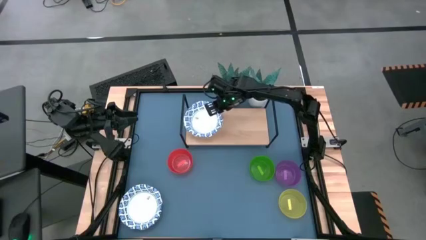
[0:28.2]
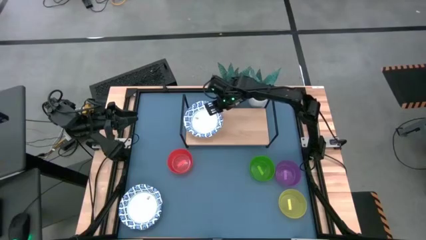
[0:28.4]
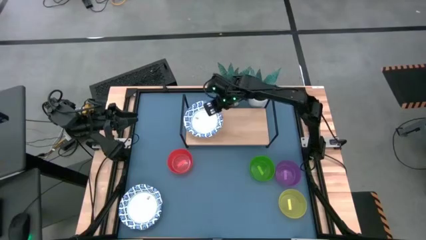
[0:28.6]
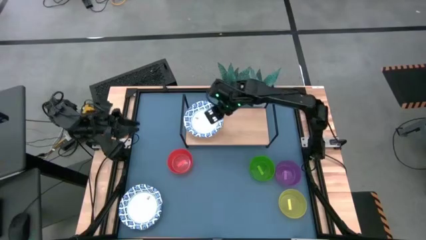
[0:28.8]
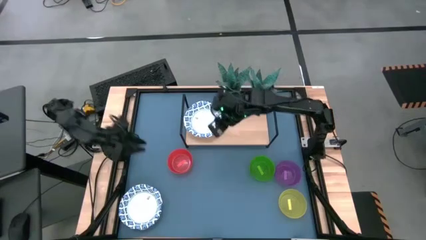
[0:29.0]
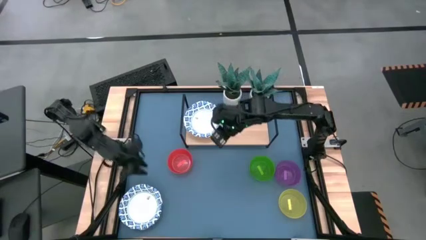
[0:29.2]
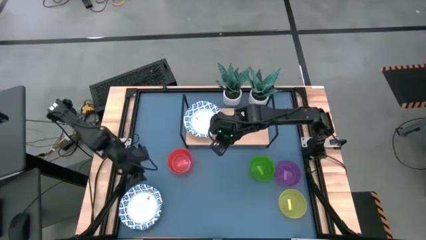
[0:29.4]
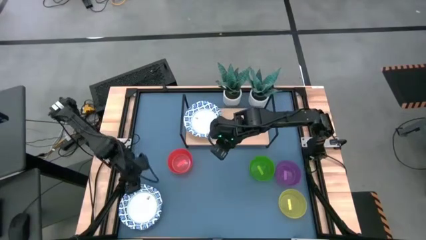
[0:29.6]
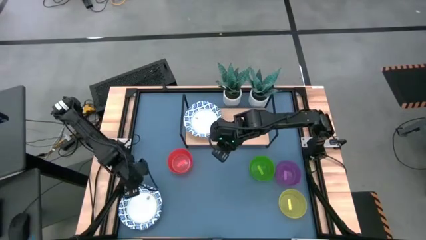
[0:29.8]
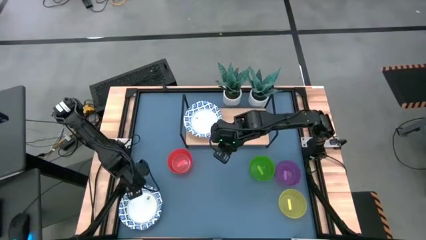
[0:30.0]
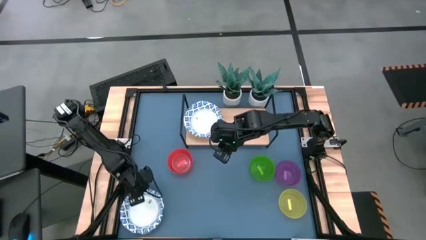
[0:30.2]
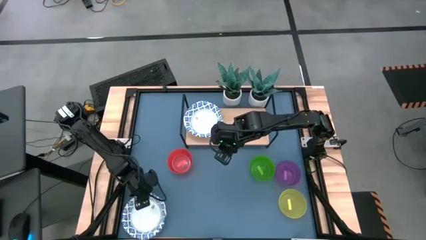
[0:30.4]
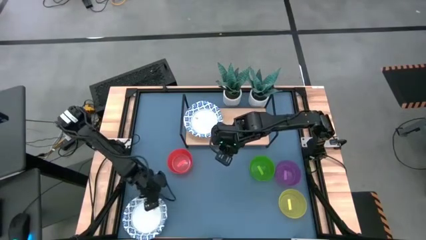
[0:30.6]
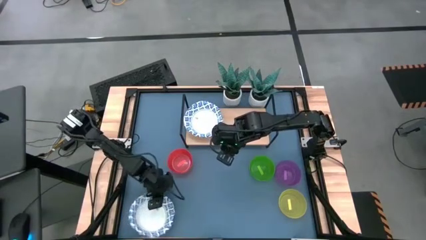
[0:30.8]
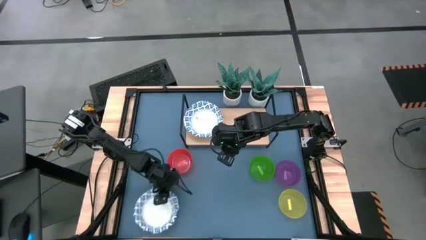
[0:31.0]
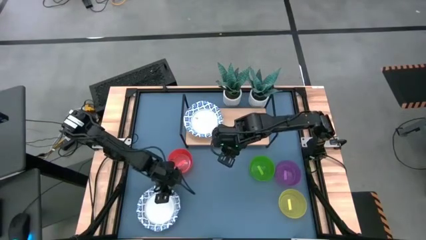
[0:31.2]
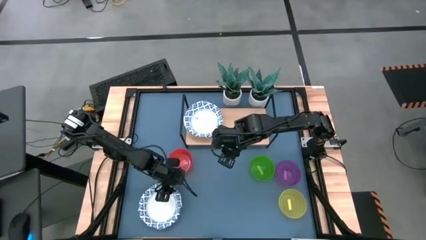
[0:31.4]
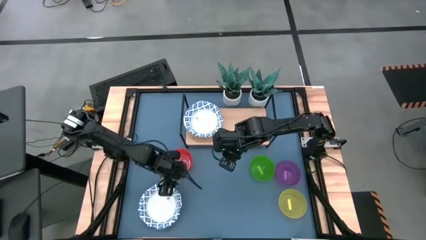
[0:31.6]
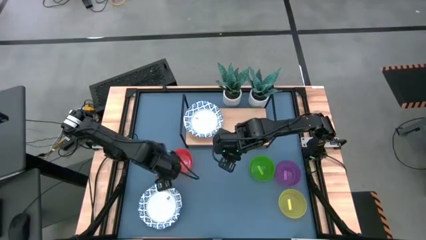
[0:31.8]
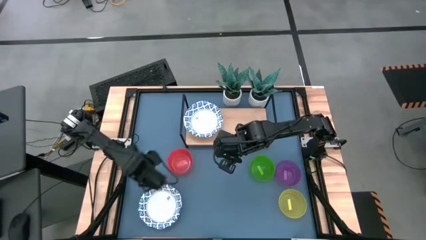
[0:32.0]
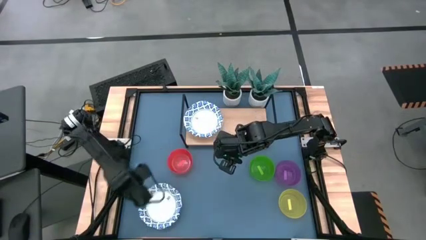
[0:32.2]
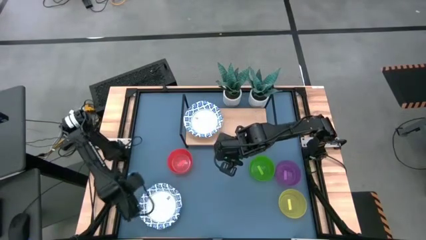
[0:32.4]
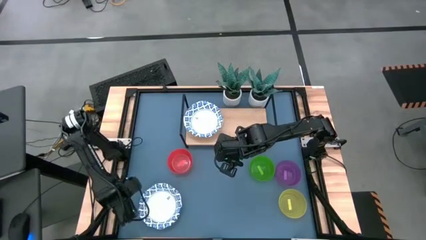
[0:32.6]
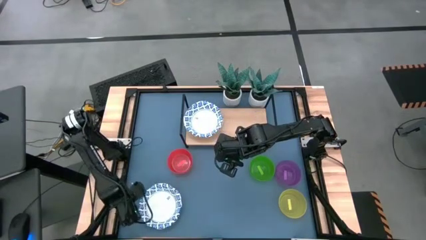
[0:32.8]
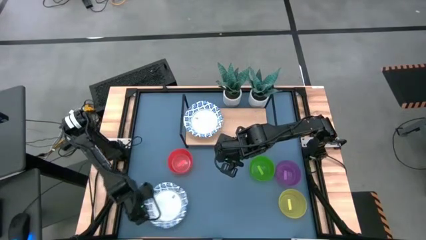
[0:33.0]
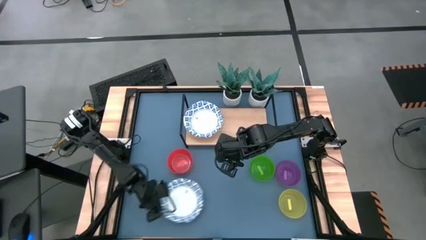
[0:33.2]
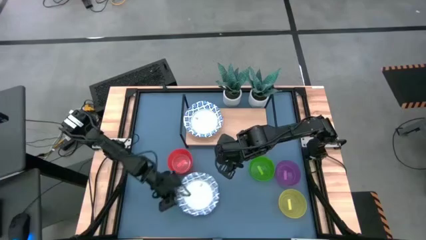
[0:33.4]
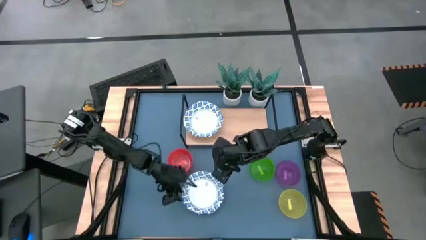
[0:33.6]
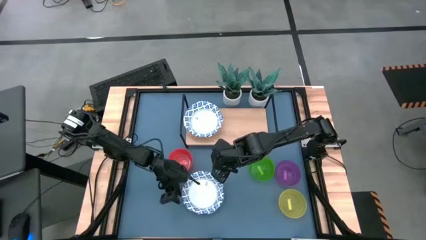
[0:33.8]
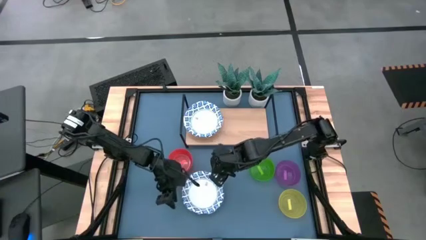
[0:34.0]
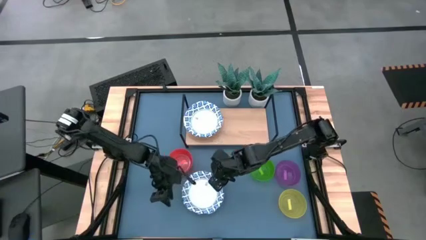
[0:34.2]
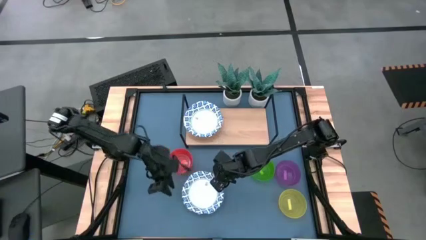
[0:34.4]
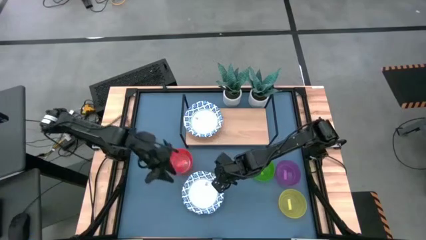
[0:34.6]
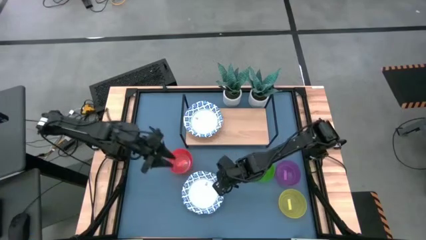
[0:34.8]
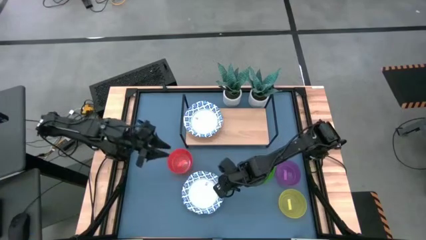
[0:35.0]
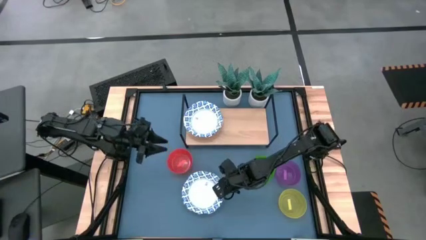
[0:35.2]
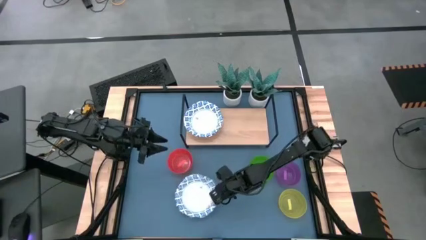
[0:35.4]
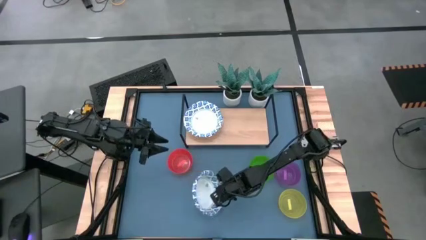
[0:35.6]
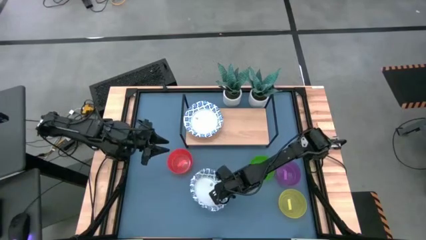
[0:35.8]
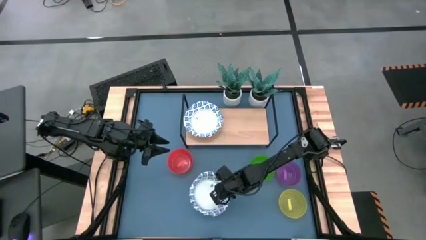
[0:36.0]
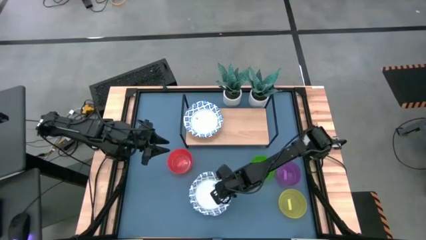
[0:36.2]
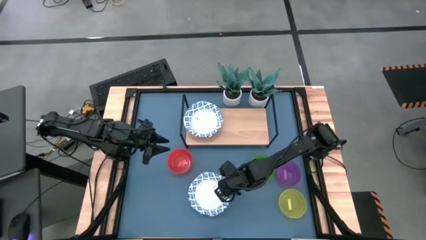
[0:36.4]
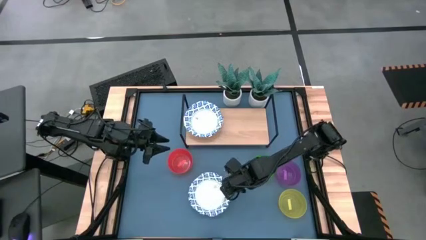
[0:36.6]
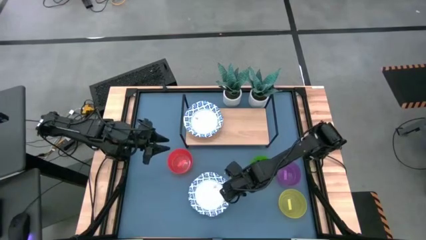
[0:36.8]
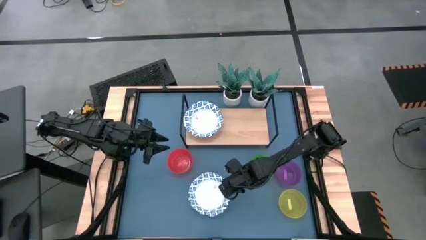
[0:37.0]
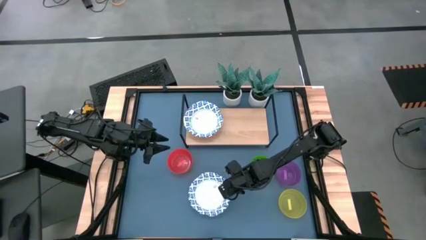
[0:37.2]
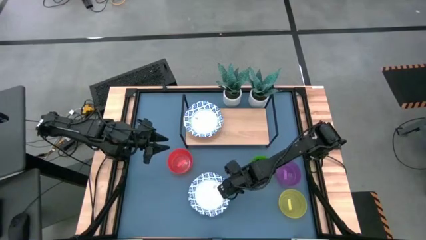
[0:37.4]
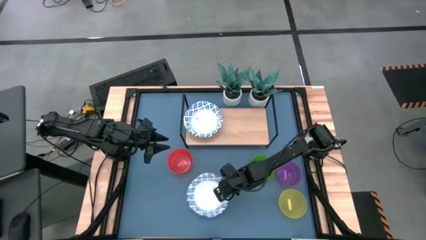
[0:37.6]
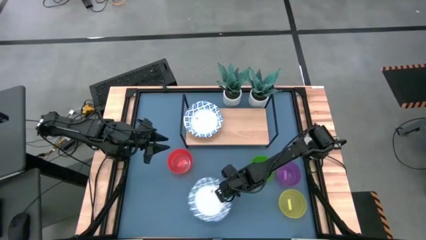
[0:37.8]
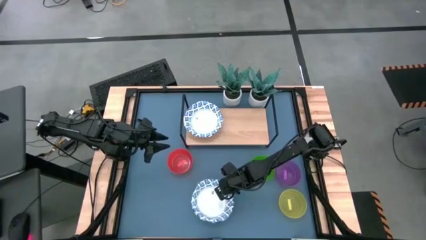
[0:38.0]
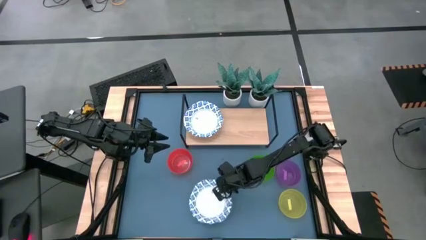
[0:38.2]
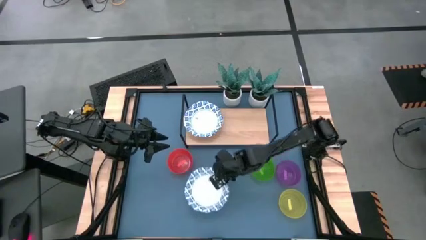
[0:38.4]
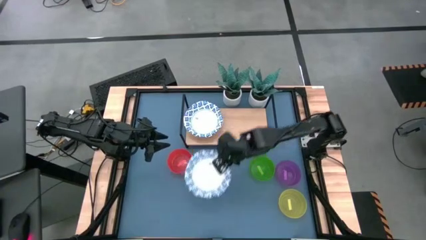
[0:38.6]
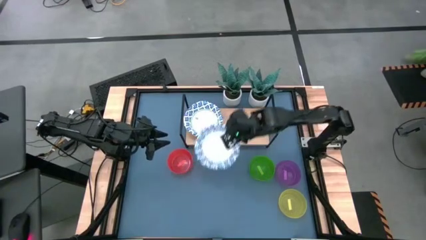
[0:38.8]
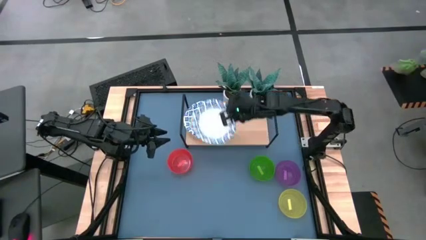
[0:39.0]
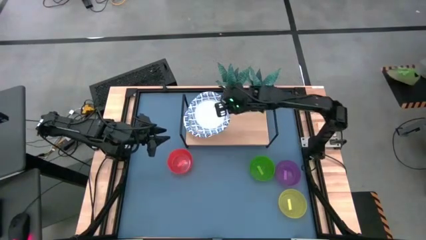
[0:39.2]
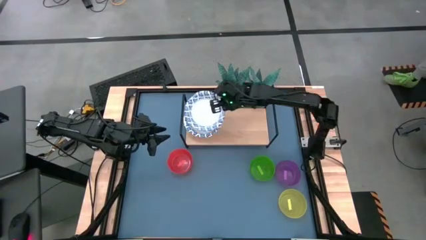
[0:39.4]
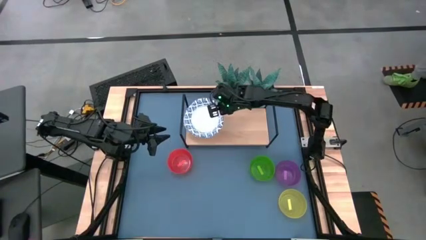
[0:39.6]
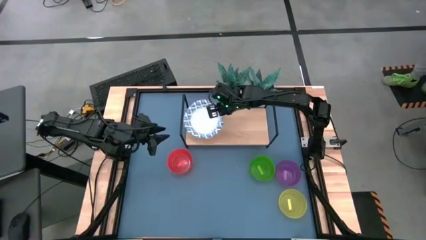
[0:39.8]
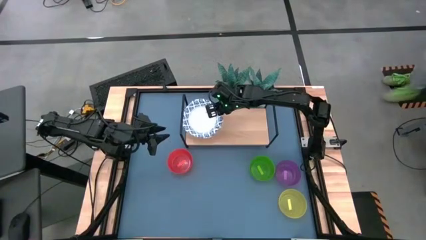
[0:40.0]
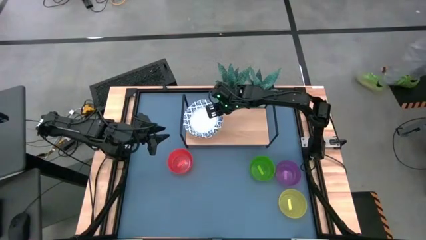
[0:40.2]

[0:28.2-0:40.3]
Task: Place and stack bowls onto a shelf
Stack the white and blue plate on top of the other white and blue plates on the shelf

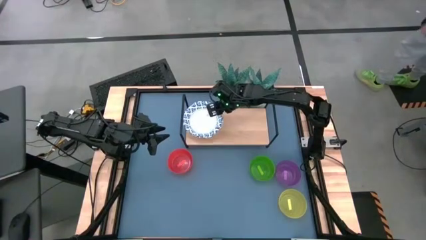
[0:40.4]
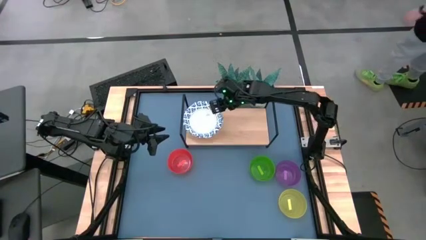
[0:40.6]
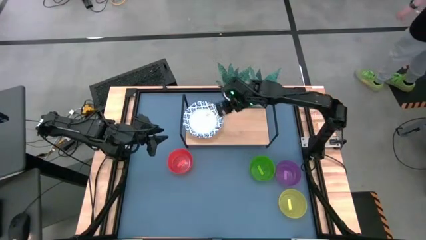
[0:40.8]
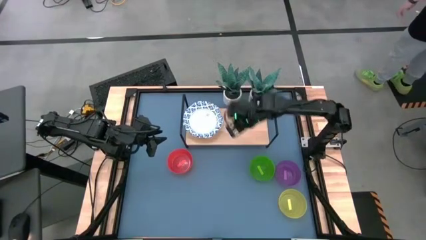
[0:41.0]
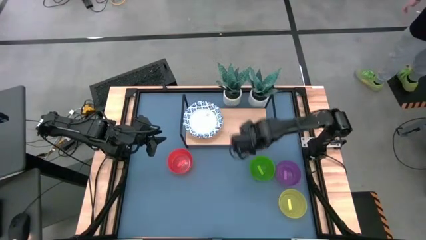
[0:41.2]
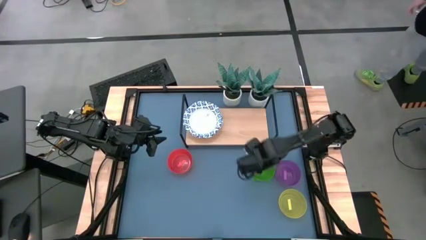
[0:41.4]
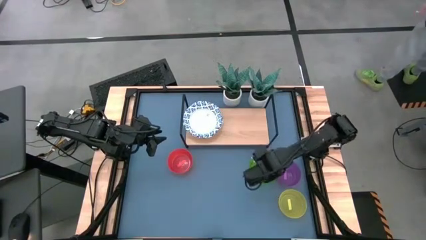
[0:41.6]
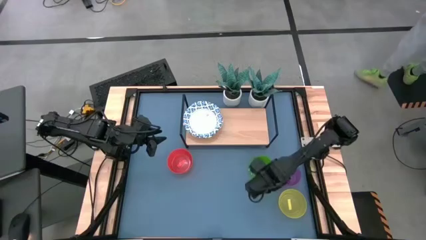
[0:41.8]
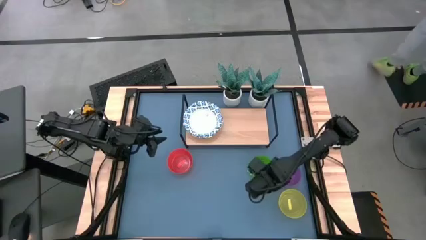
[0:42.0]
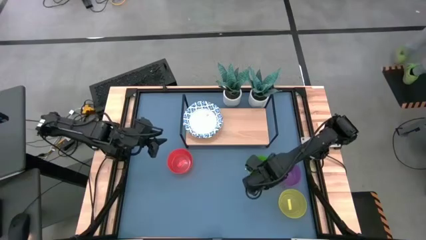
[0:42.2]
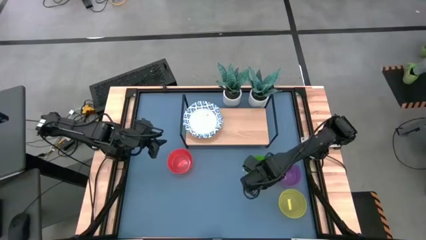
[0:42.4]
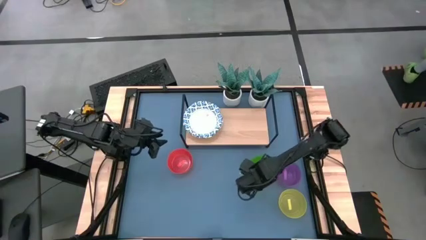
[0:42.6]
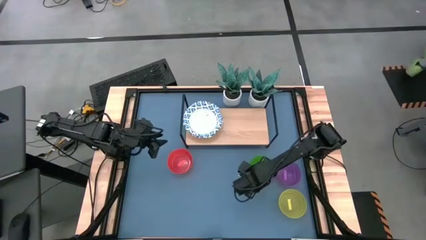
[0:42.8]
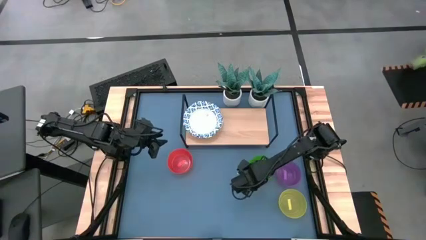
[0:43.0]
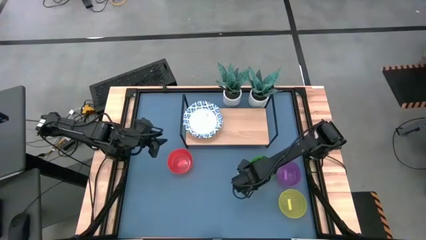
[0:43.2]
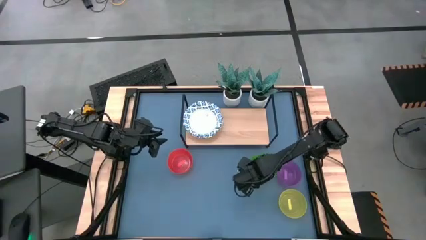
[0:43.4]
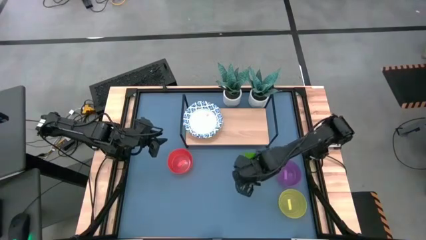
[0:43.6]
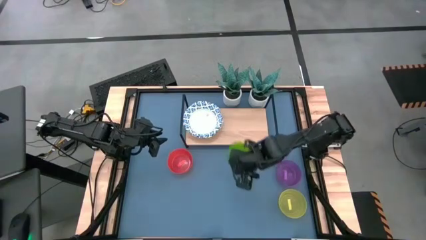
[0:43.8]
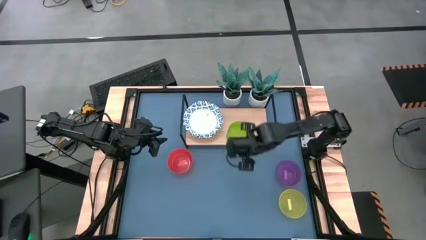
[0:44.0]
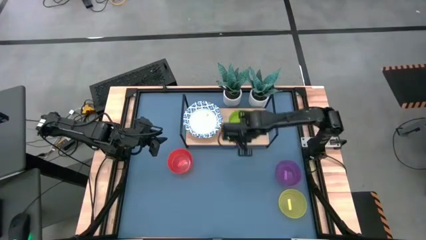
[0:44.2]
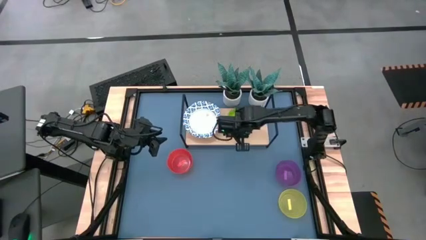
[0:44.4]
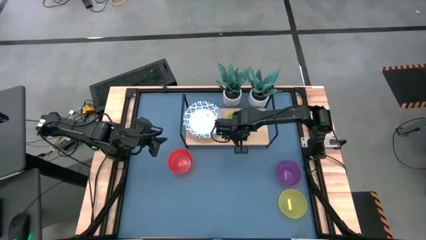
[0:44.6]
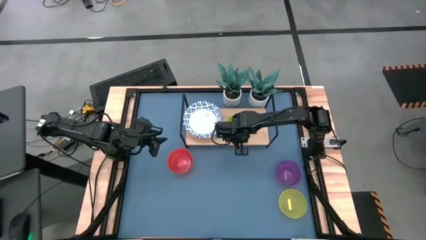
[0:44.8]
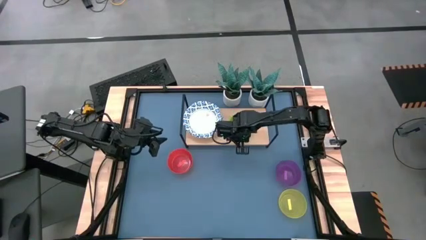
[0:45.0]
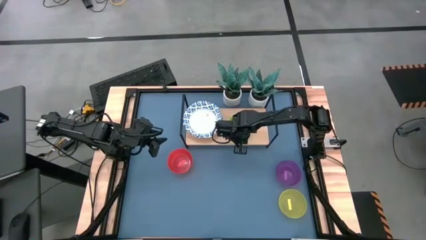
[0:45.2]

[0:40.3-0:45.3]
Put the green bowl on the shelf
